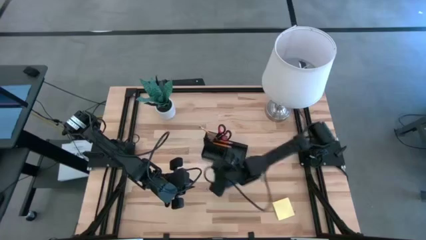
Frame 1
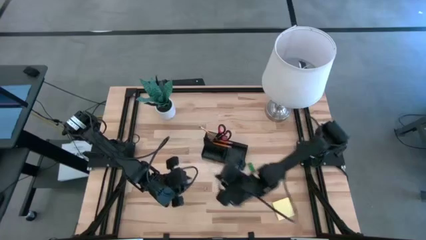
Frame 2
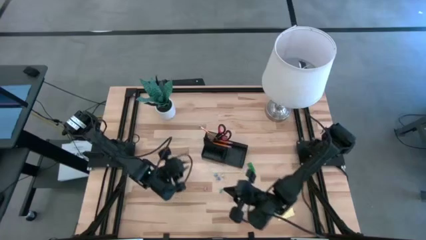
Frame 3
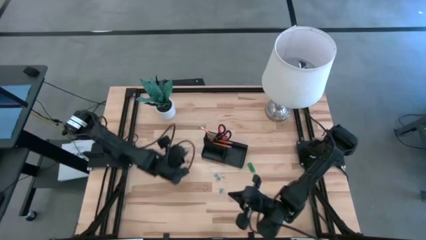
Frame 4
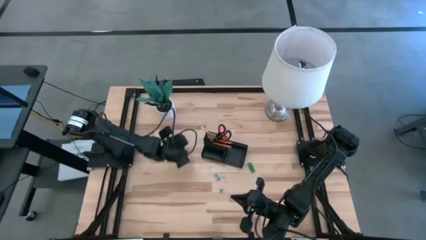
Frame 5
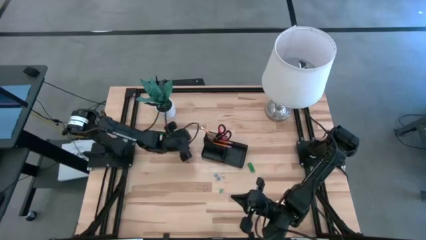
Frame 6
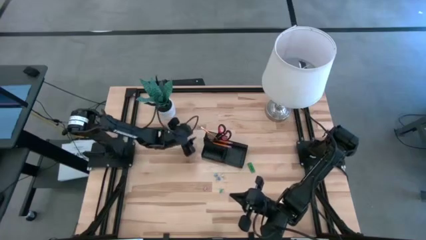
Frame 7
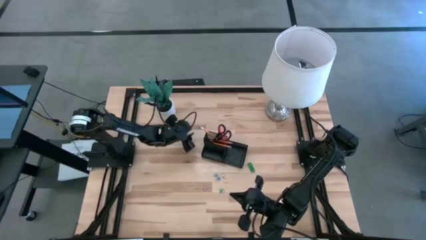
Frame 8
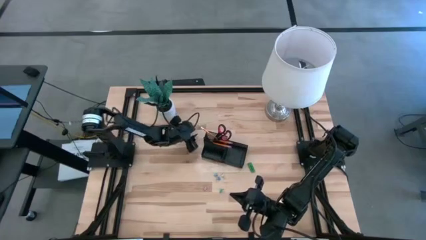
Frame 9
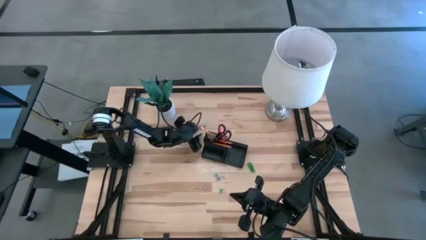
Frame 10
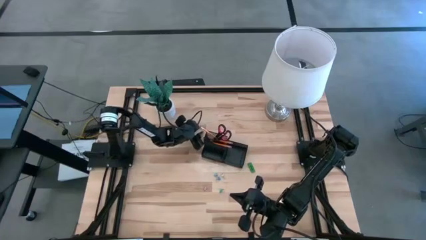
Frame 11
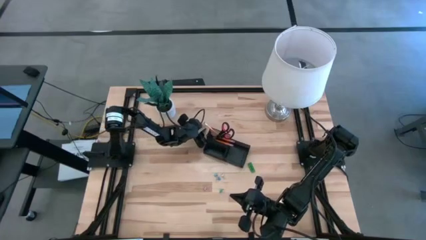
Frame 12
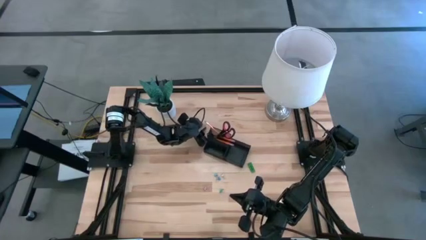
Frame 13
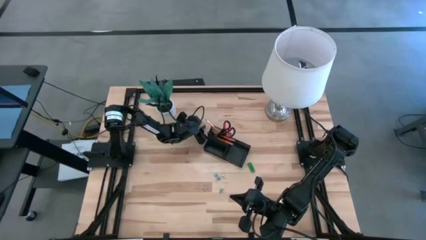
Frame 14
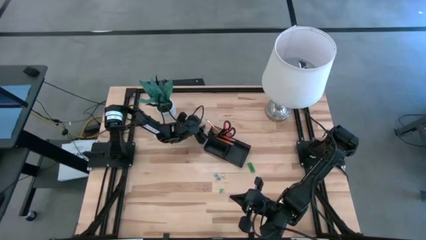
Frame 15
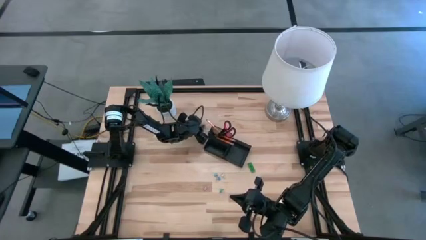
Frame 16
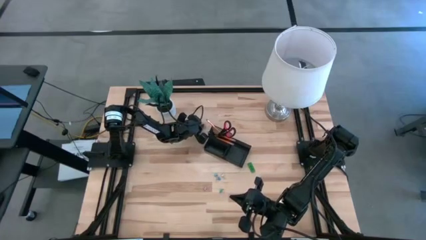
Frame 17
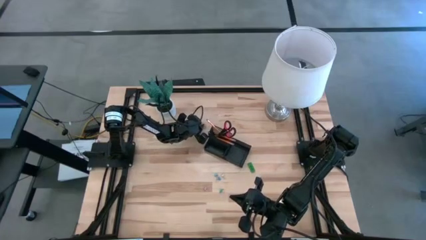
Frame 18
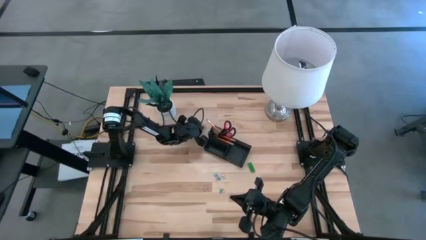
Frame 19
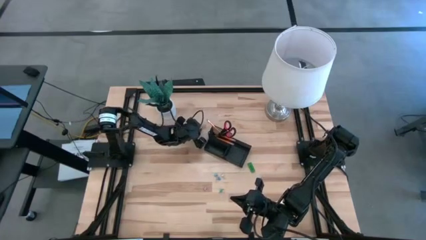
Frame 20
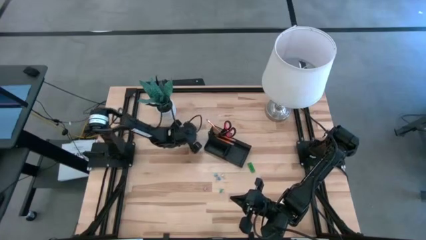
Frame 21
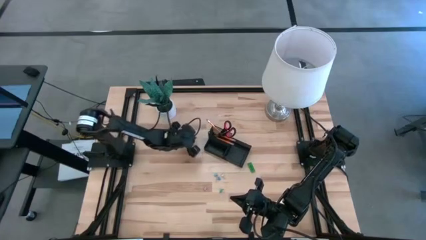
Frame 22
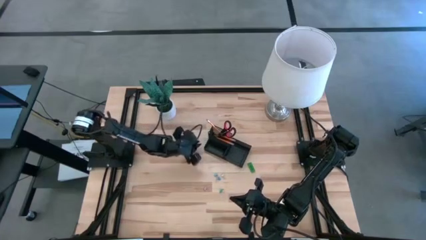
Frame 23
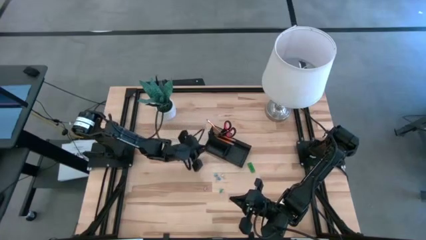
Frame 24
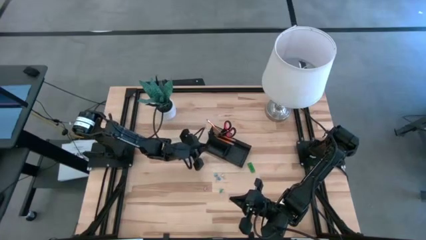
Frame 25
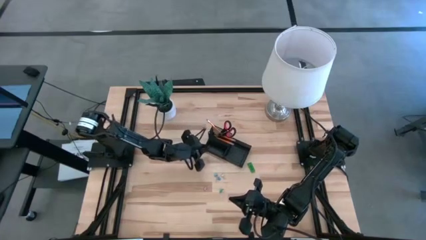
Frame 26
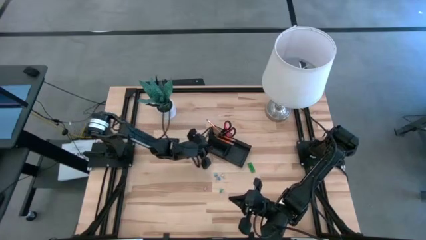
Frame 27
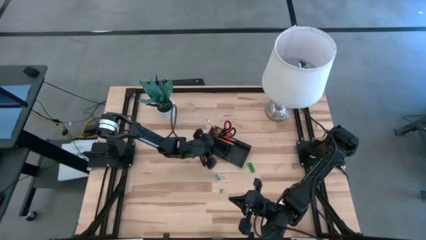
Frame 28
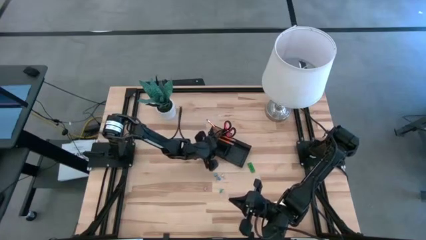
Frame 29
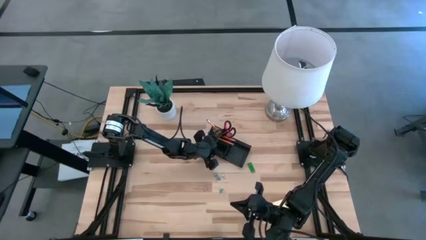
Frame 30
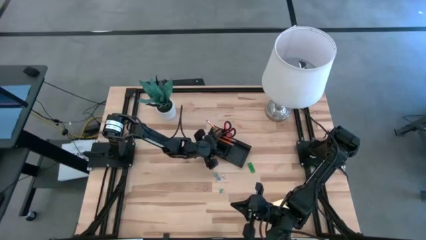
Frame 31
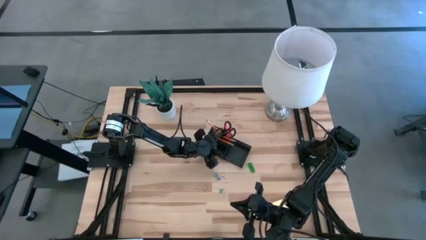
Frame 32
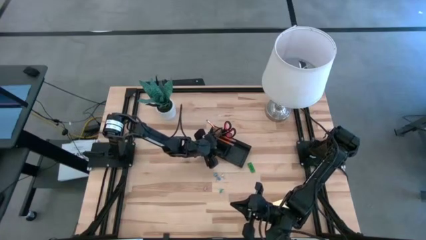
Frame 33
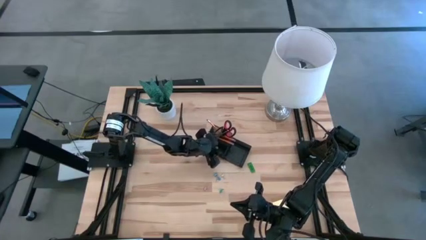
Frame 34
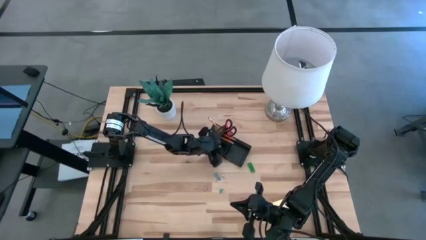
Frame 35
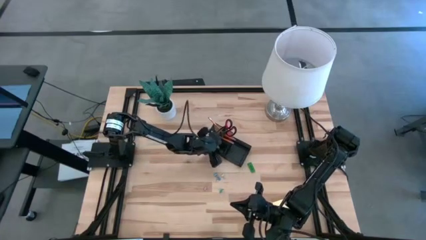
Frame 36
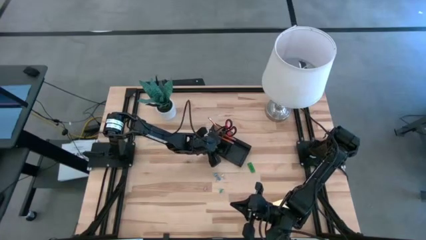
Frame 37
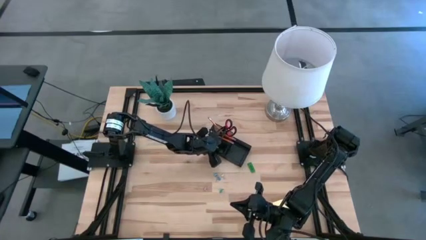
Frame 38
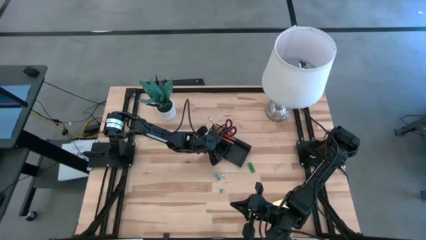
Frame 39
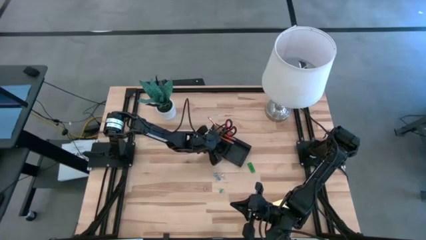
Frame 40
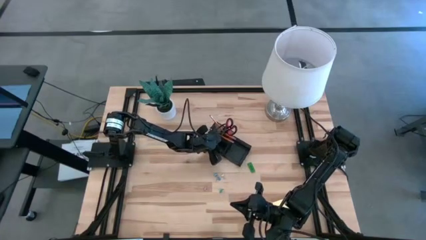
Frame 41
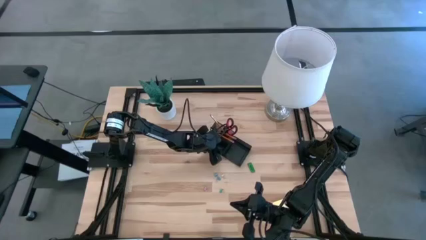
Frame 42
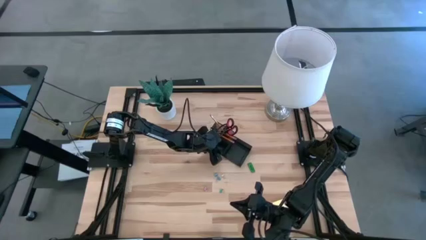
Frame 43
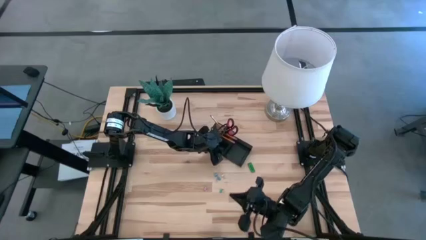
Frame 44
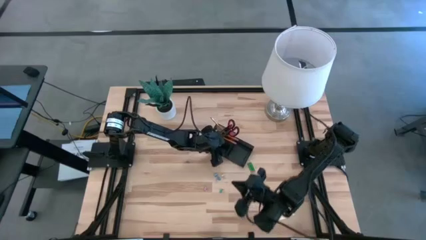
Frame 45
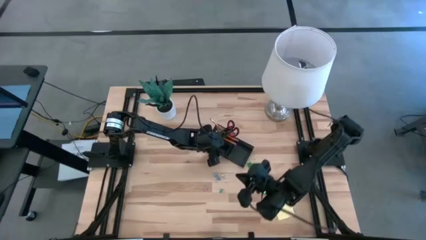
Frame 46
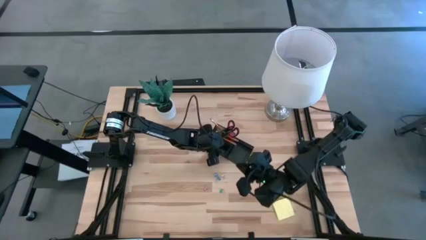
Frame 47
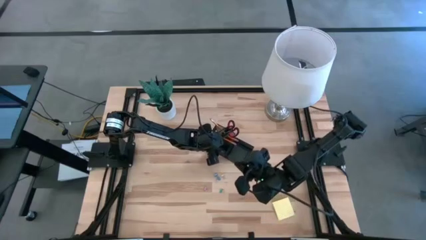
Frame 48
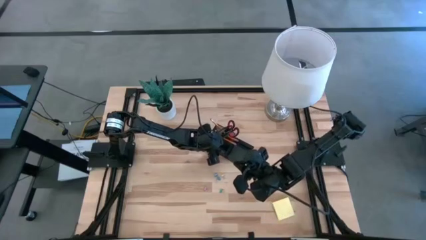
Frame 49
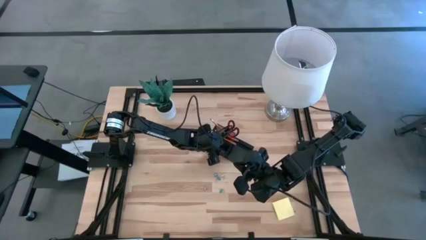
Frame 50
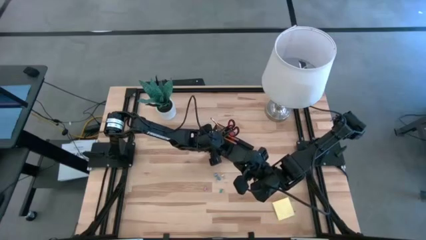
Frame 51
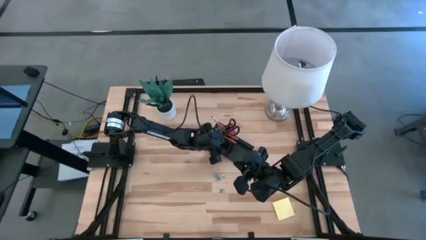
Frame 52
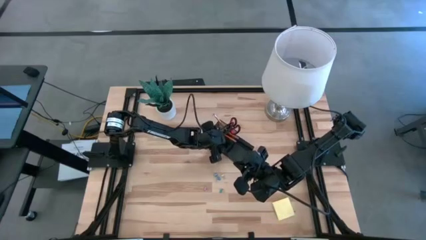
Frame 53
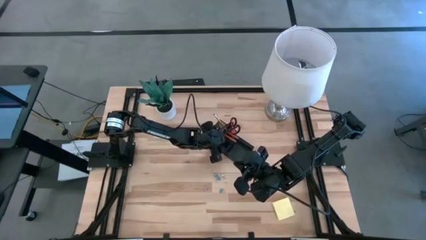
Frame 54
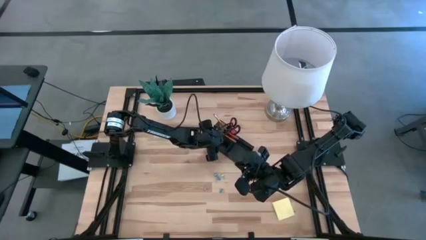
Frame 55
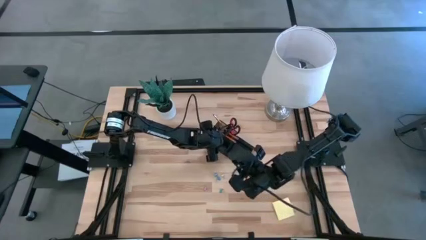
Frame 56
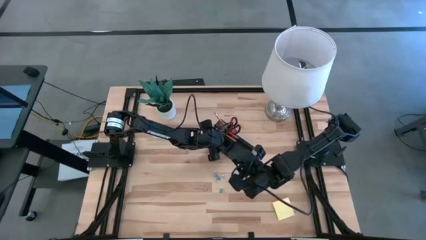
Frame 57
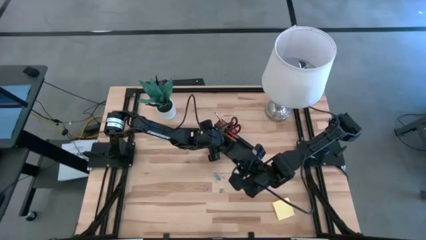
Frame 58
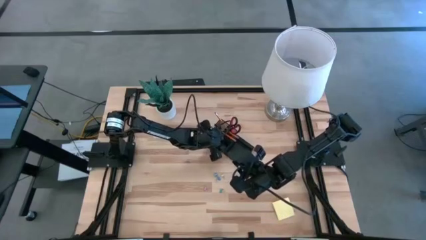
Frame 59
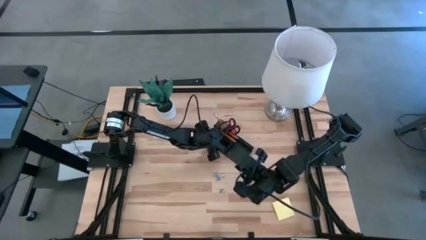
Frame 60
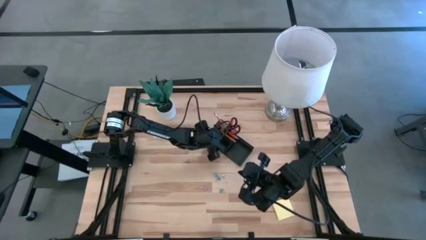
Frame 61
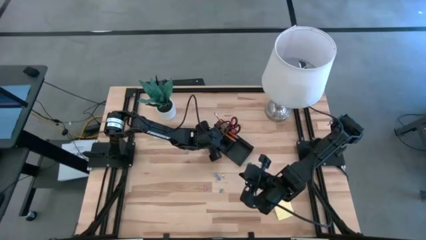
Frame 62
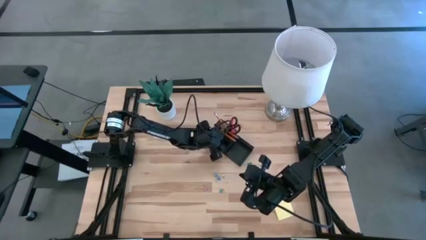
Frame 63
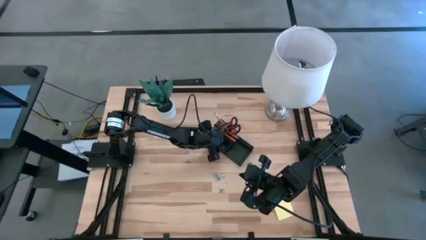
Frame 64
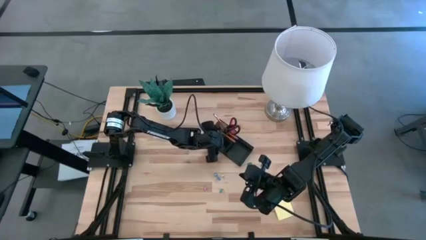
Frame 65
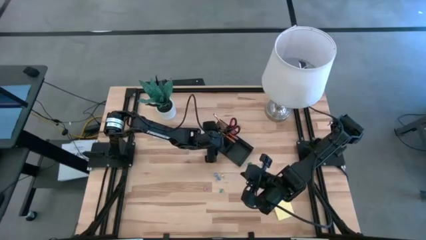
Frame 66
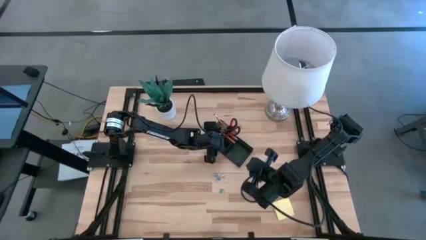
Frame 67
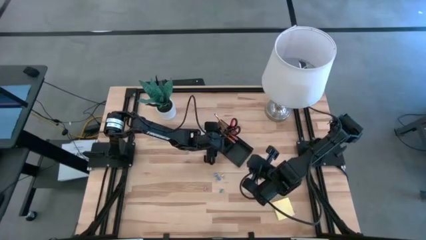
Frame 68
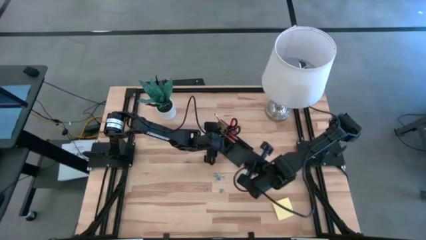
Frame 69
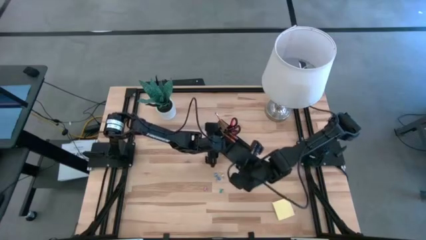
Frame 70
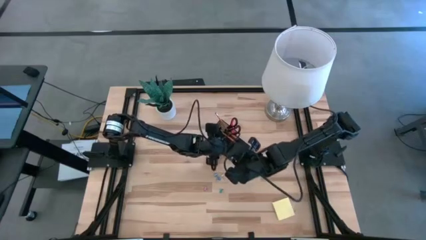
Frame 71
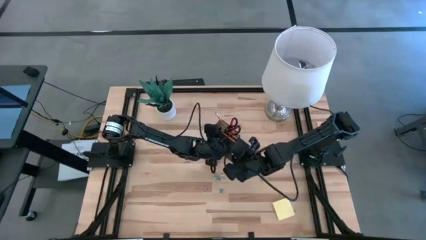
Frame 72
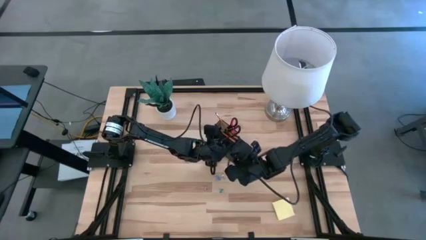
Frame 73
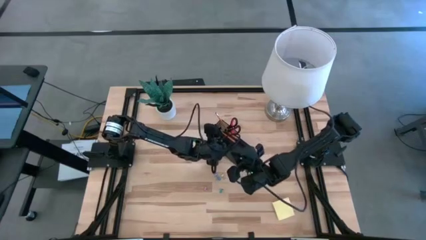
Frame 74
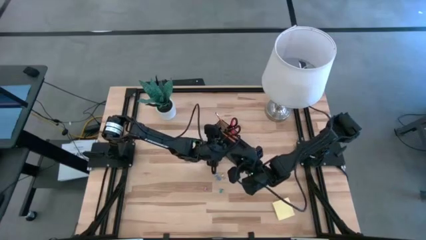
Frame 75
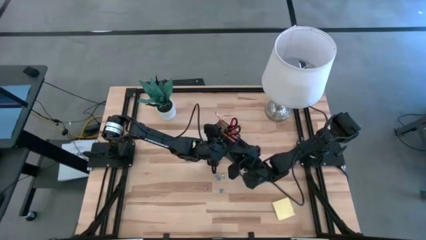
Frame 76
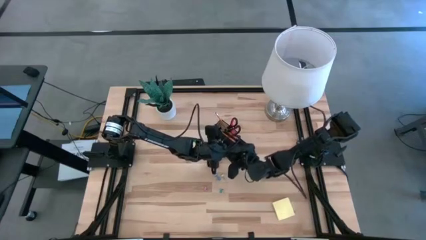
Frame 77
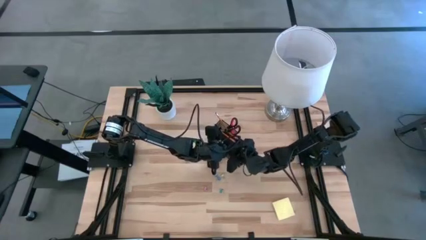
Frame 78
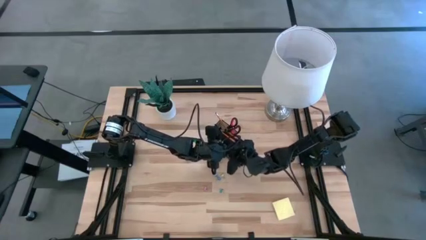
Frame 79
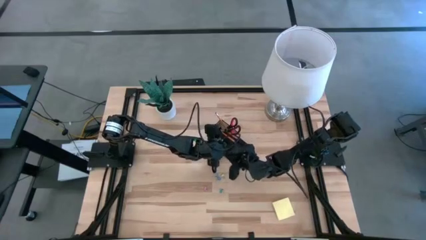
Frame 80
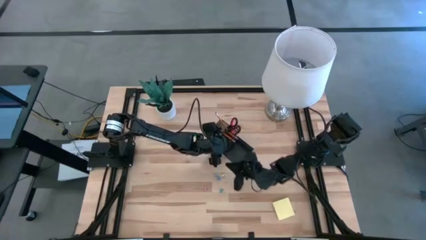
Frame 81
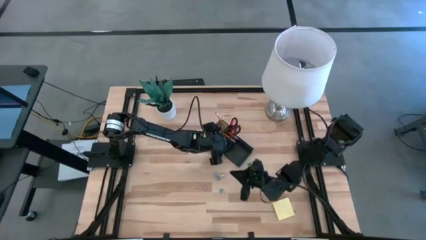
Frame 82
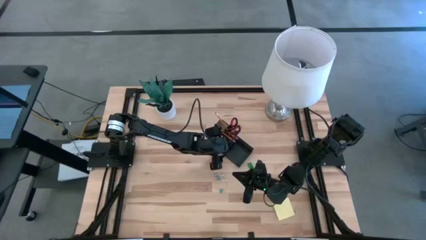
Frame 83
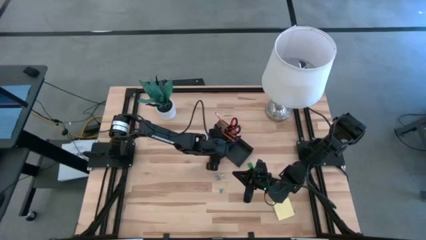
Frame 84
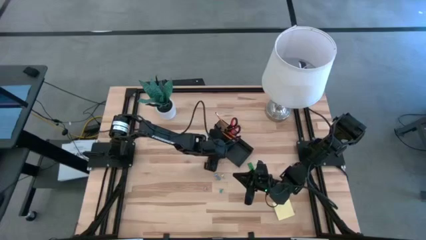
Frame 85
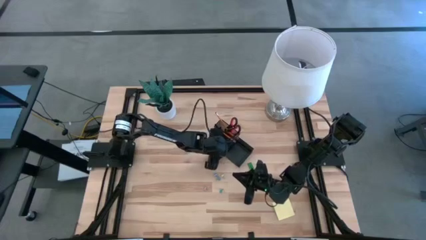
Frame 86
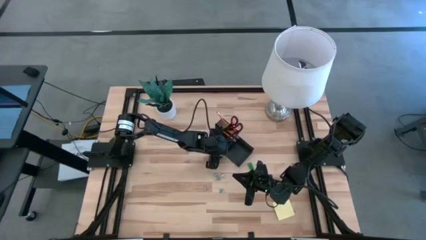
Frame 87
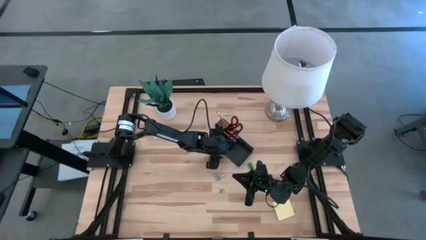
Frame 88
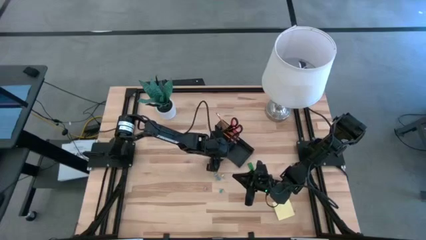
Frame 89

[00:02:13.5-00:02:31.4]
Task: Pick and place office supplies into organizer
Put the top yellow binder clip into the black desk organizer
